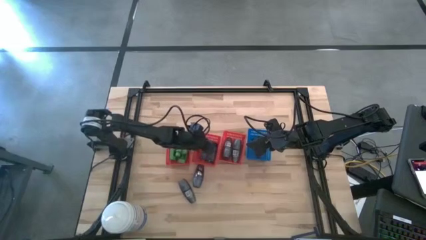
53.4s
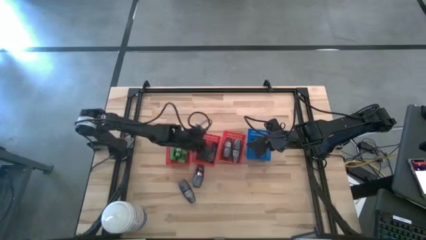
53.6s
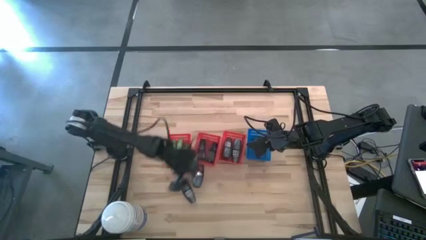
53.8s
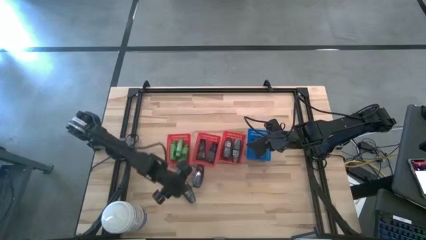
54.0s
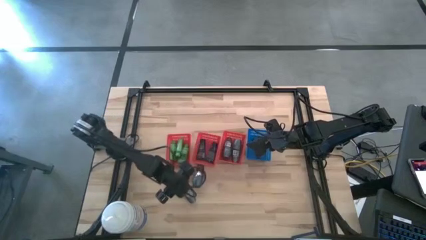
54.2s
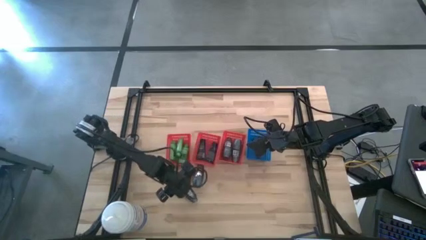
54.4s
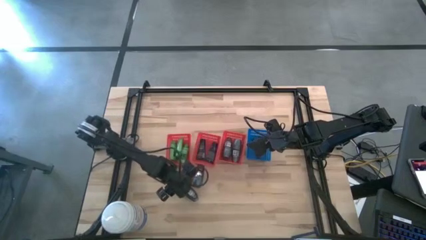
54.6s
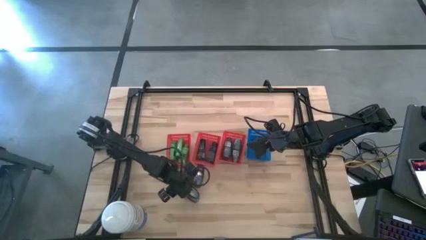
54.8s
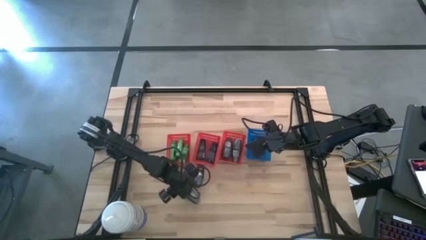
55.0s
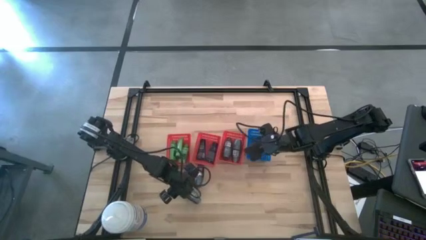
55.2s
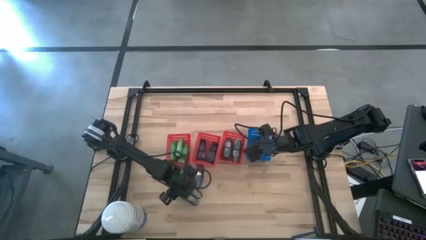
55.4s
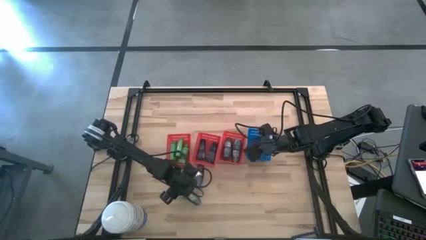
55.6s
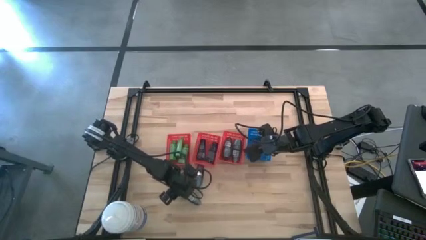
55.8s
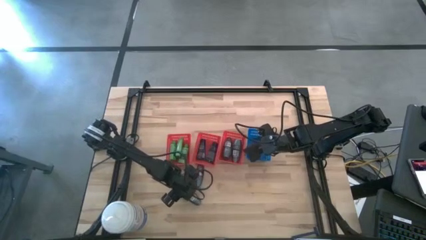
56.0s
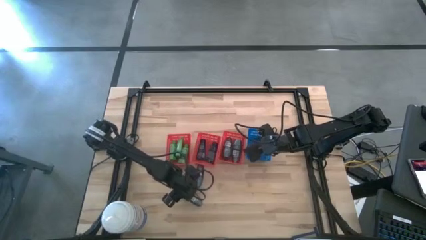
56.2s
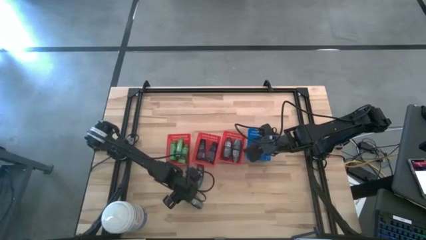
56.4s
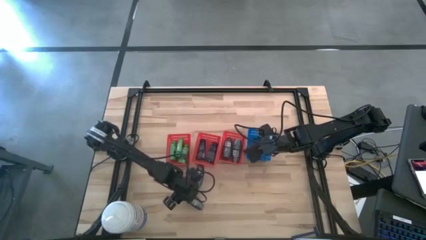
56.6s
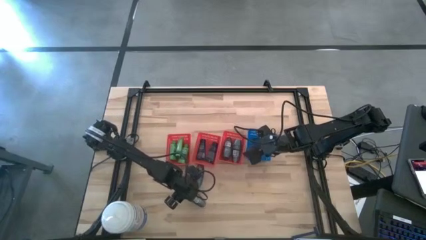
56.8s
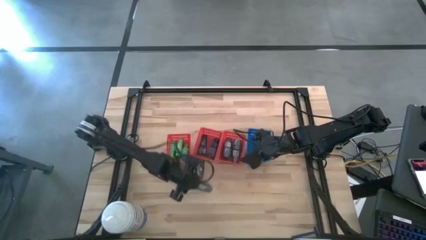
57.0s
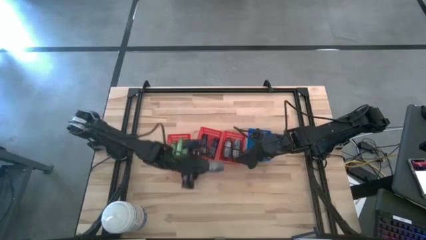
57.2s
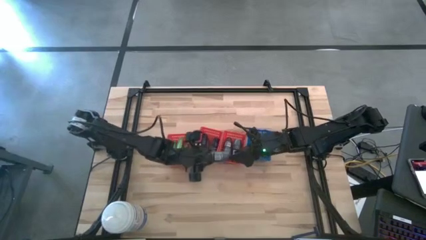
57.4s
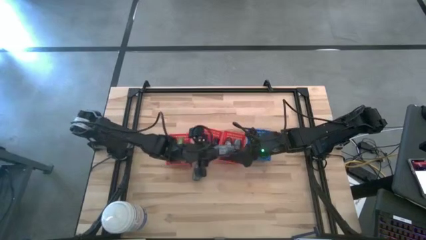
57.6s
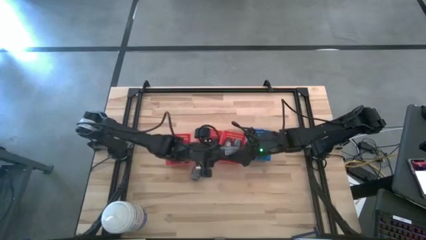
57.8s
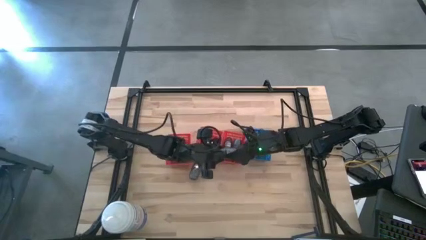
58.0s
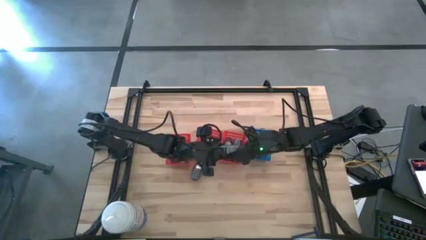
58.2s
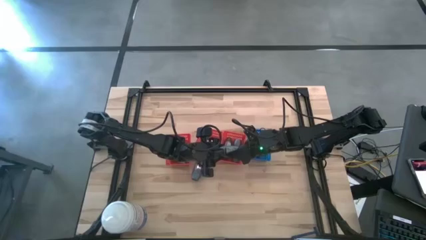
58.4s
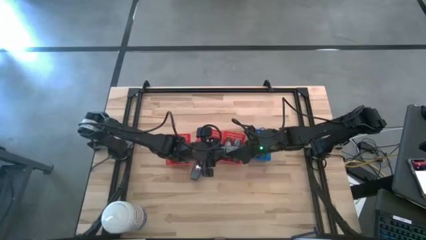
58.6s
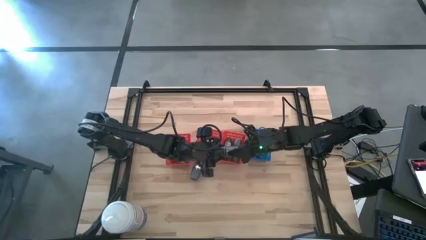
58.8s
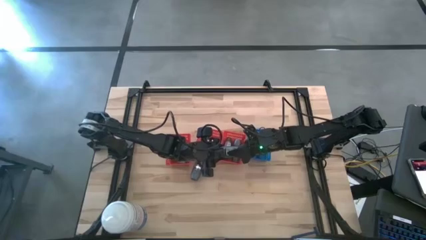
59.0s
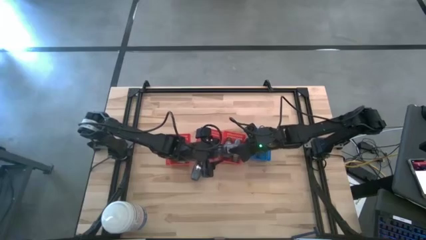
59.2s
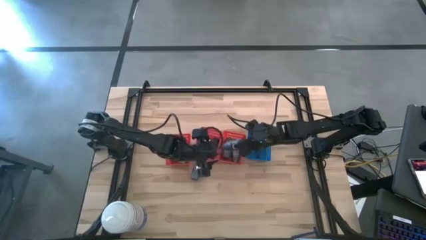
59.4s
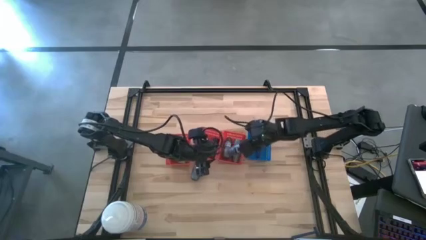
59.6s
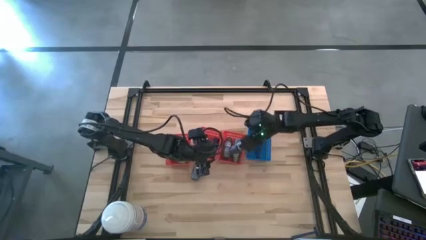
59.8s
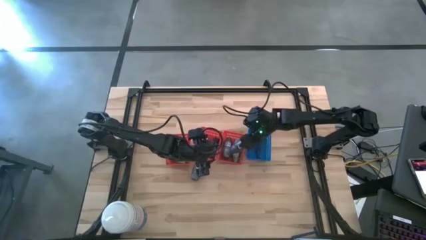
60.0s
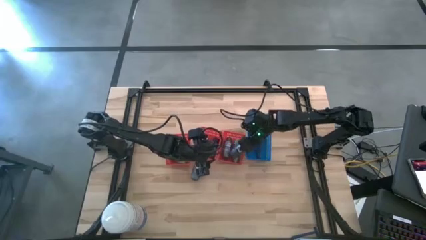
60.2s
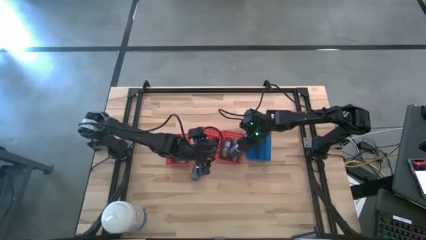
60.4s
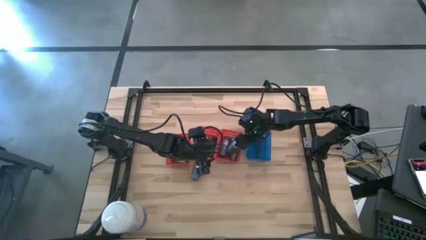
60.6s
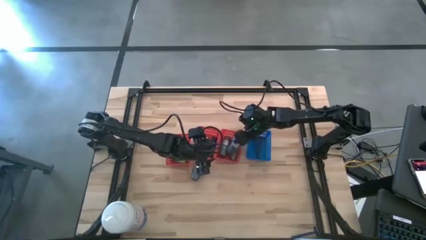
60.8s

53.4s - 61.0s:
Task: Pick & Place Travel size toiletries
Put the deodorant into the right red bin

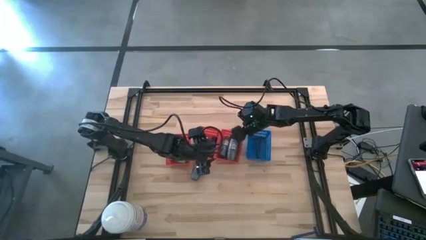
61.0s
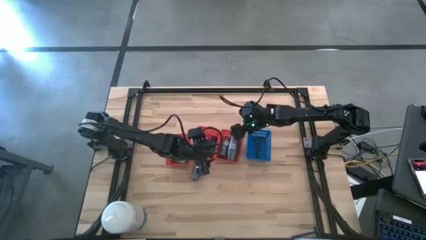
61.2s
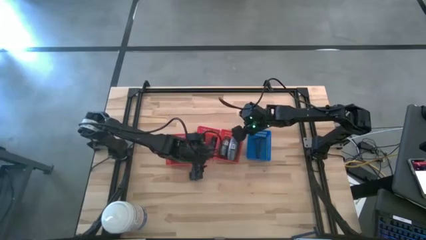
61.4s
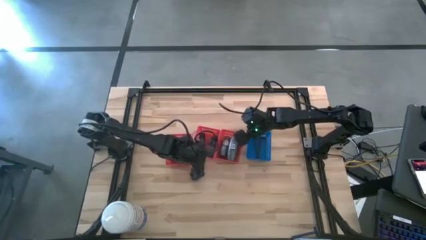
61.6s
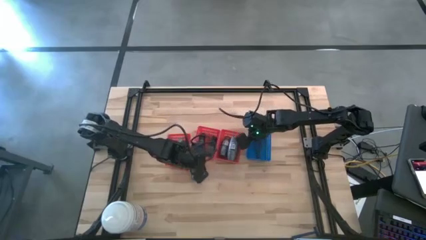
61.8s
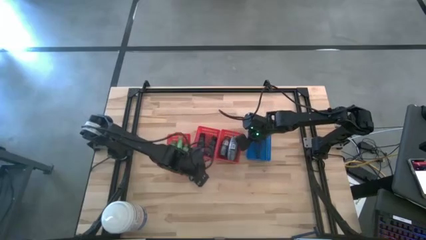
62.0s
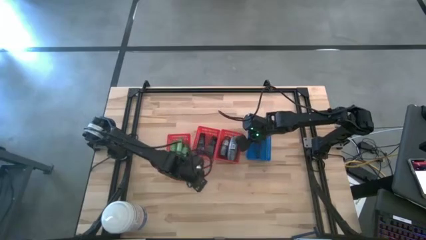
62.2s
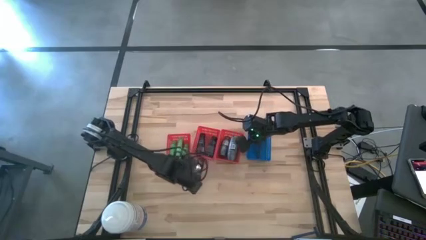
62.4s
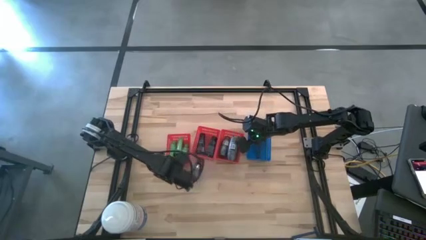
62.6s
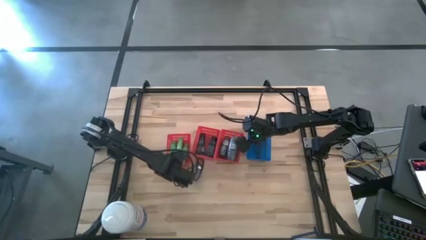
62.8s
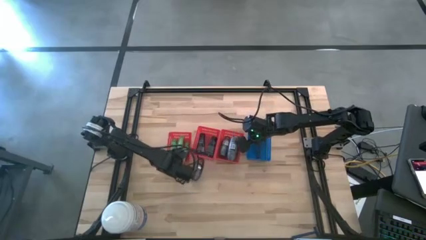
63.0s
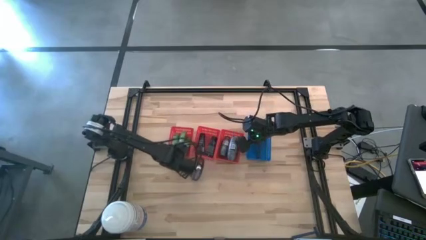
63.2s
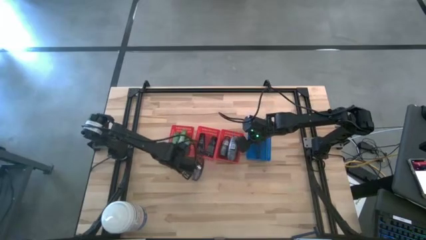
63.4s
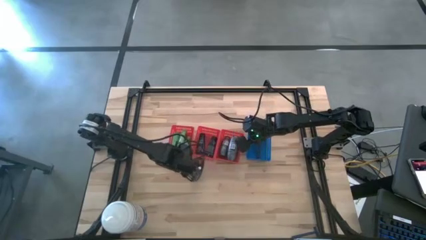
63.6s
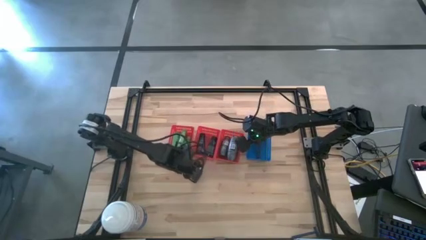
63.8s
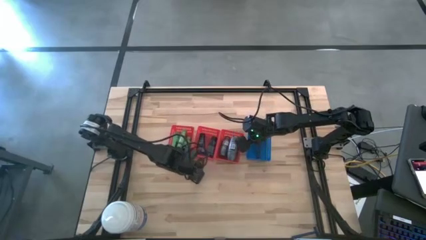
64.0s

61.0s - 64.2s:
Adjust the left red bin
